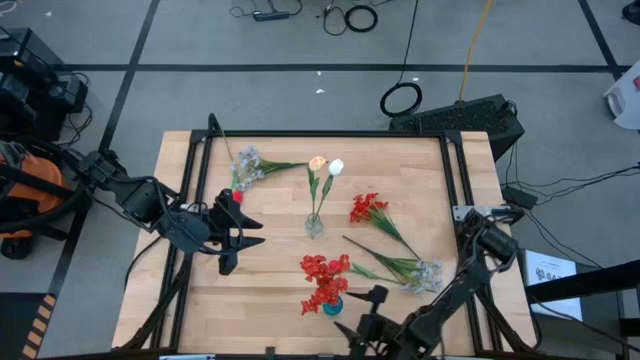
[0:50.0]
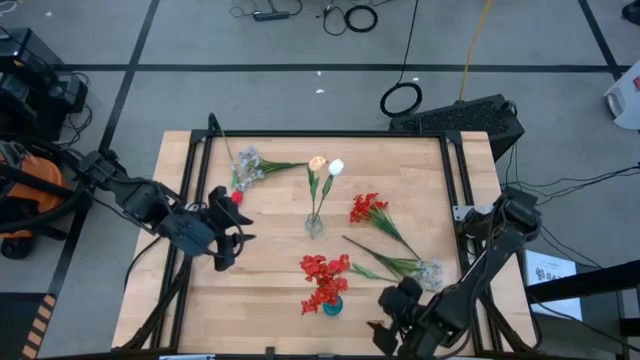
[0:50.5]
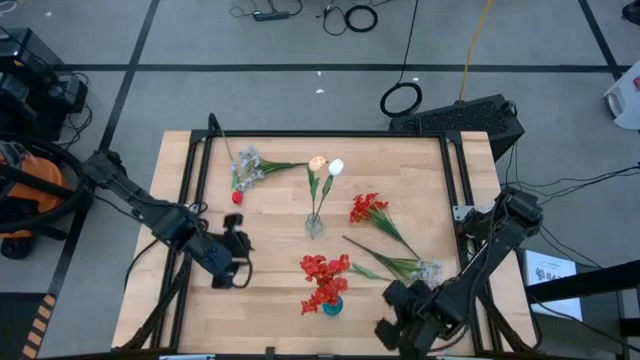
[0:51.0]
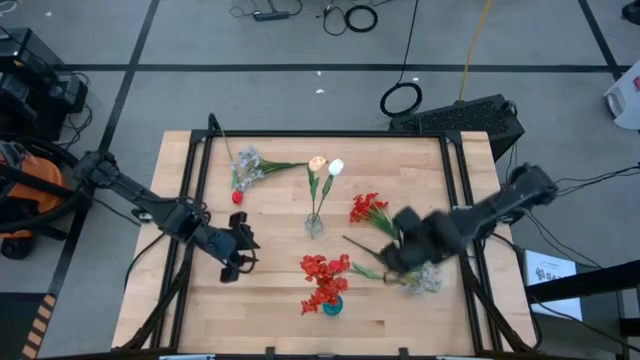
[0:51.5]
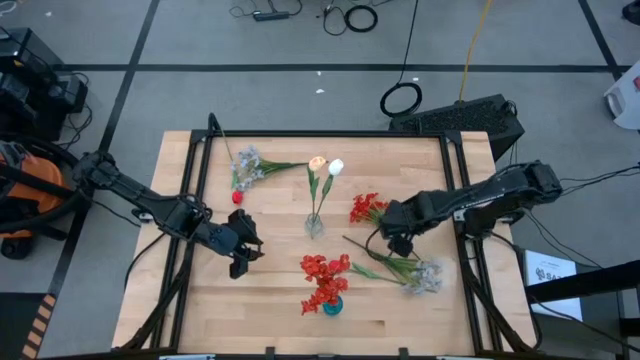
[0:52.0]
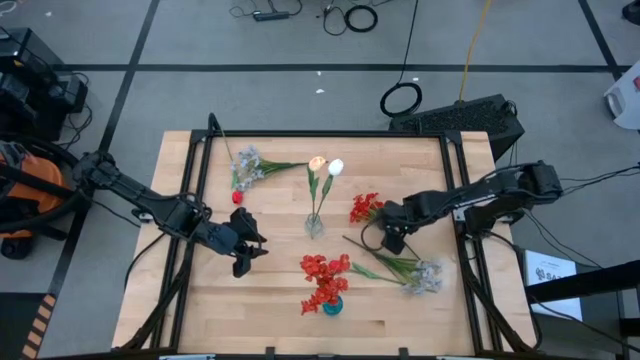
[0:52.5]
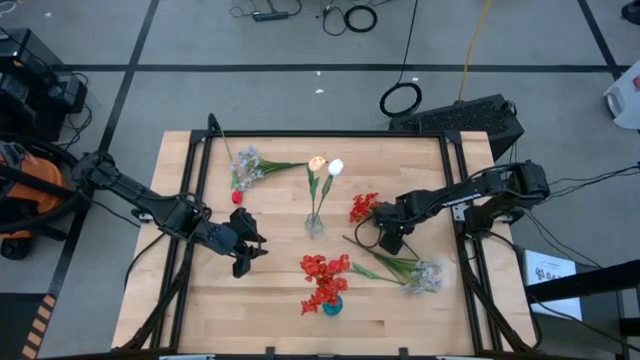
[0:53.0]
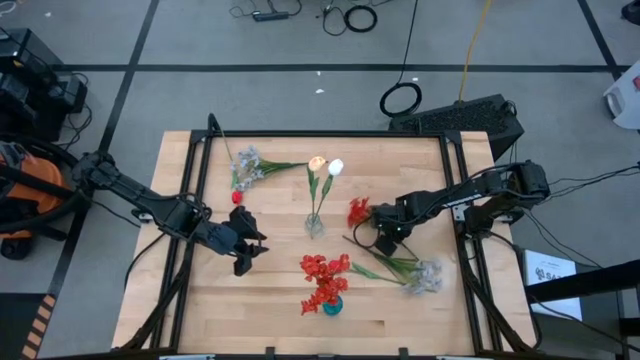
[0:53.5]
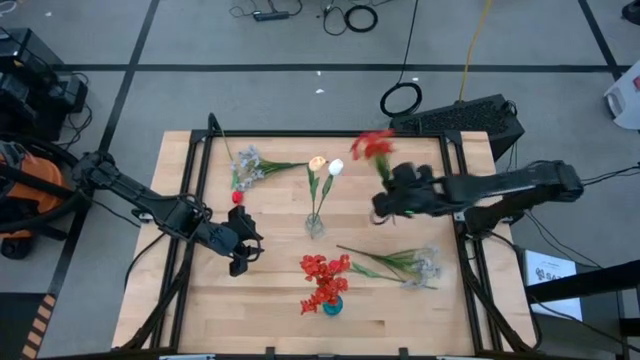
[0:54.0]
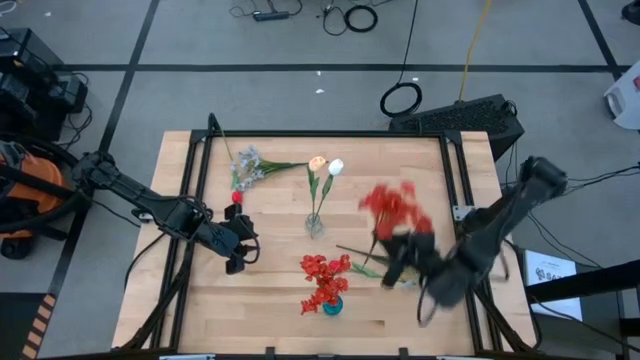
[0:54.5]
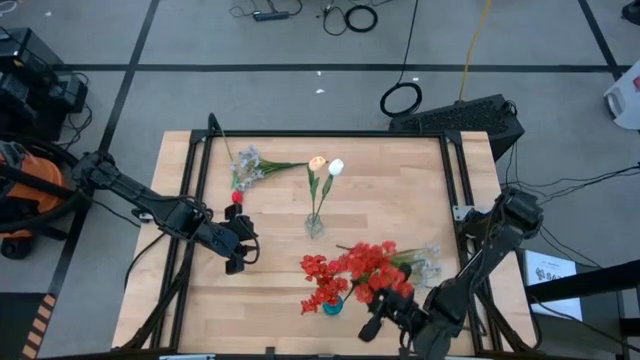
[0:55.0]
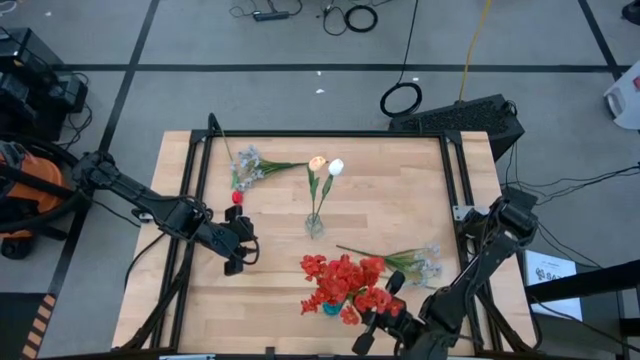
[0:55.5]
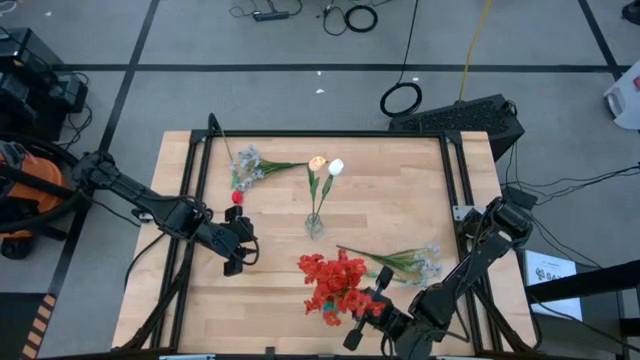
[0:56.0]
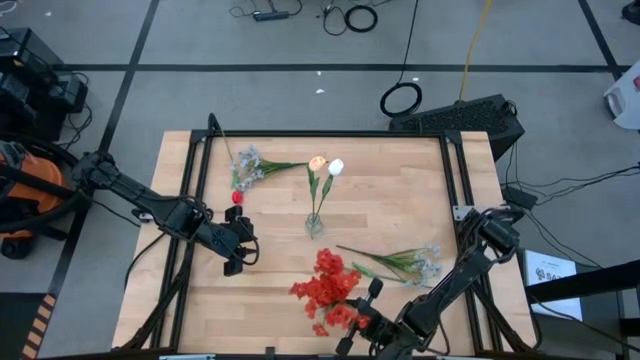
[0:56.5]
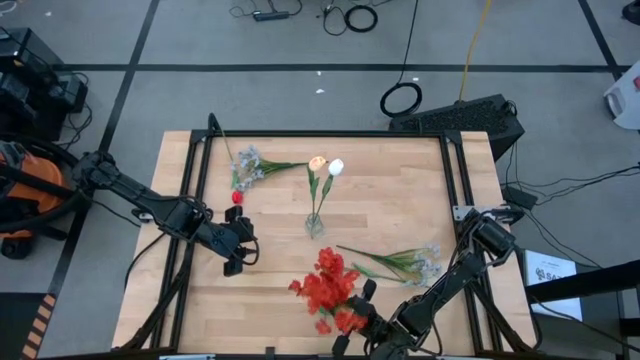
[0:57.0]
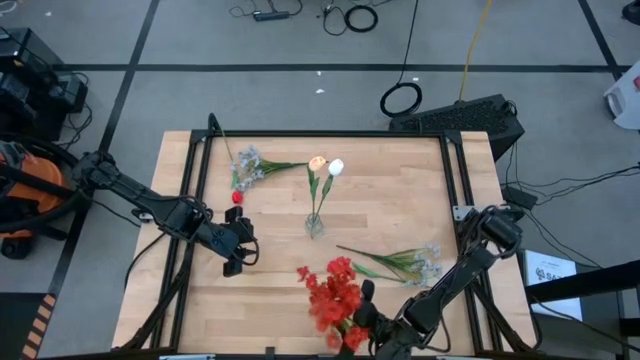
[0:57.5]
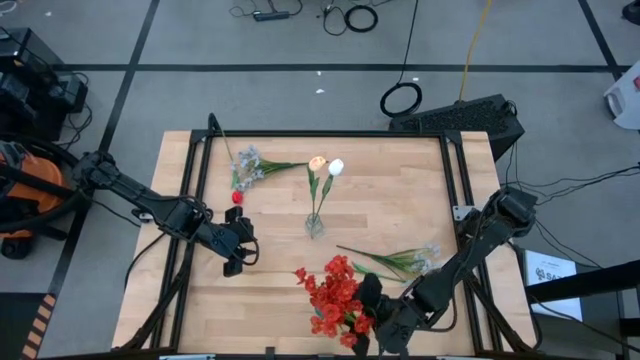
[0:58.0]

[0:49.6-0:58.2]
Task: Sort flowers into vase by color
Put the red flowers into the blue vase

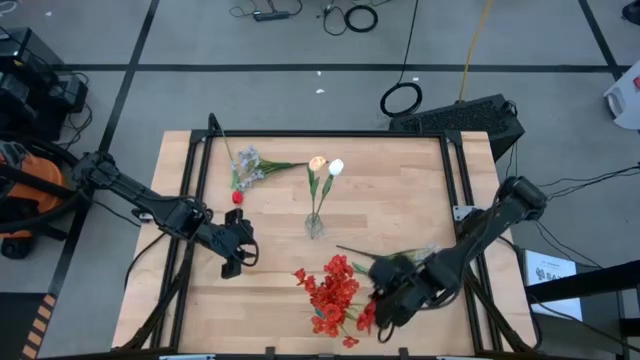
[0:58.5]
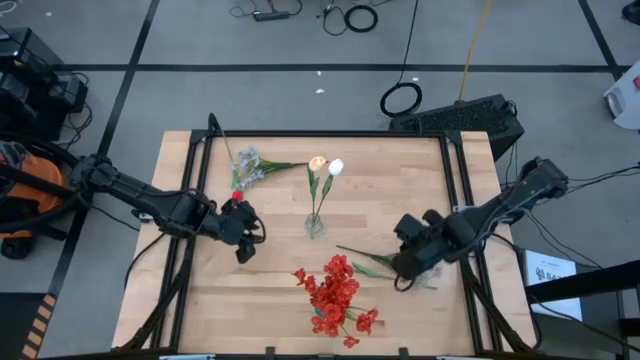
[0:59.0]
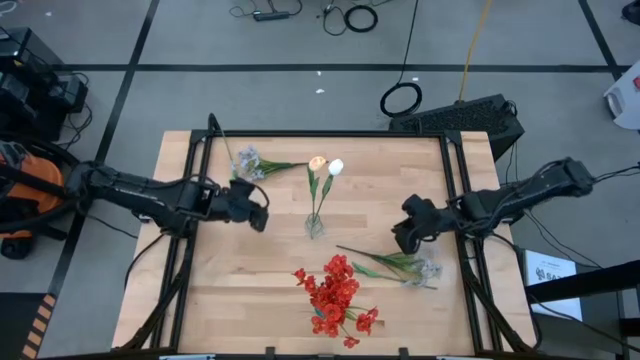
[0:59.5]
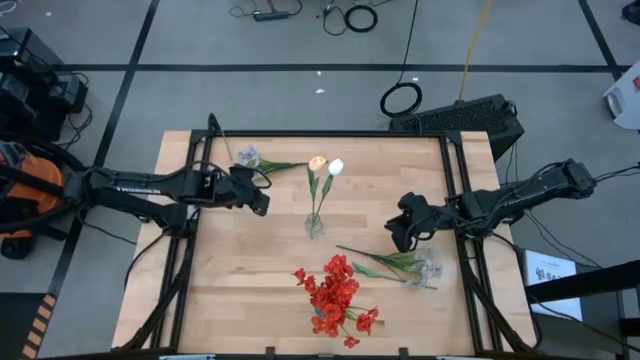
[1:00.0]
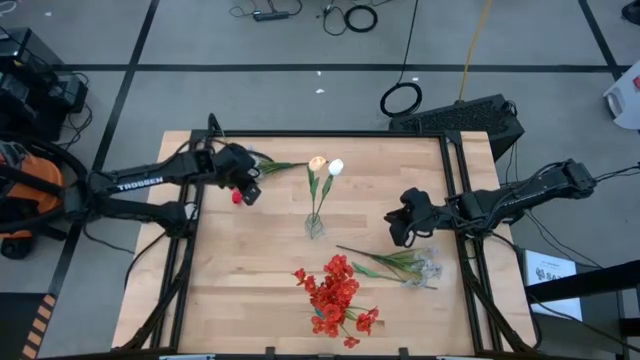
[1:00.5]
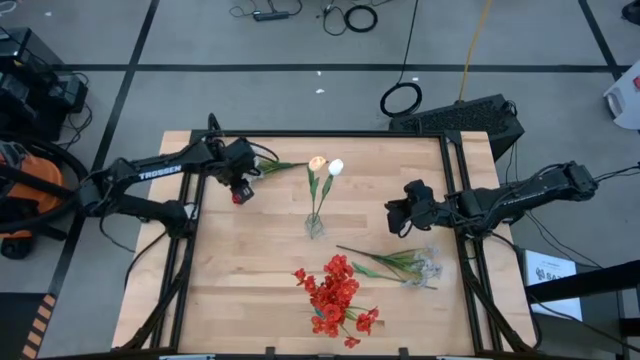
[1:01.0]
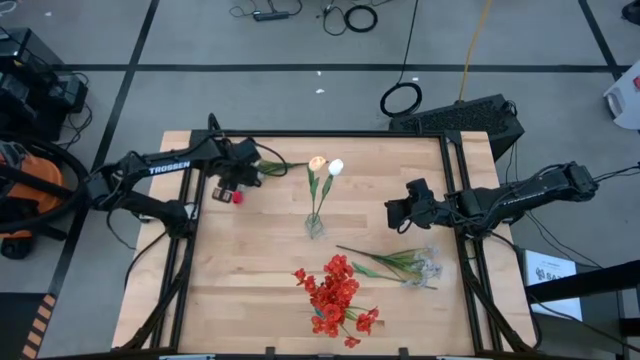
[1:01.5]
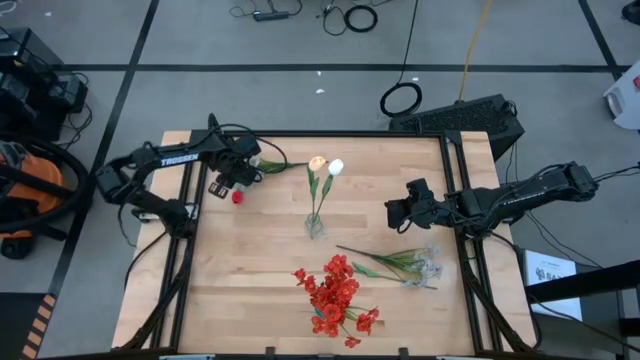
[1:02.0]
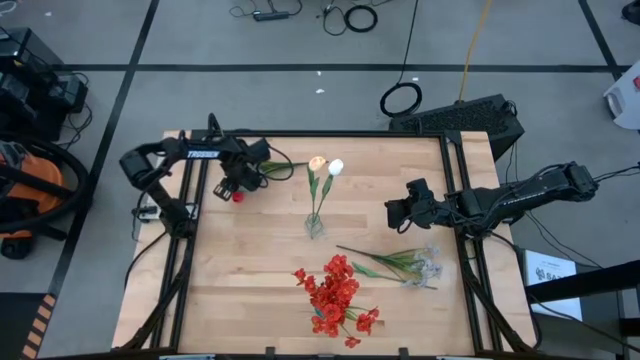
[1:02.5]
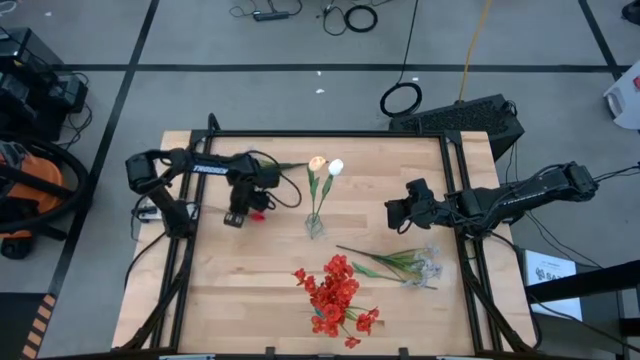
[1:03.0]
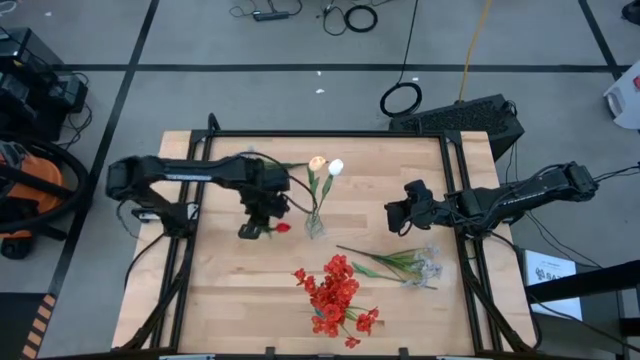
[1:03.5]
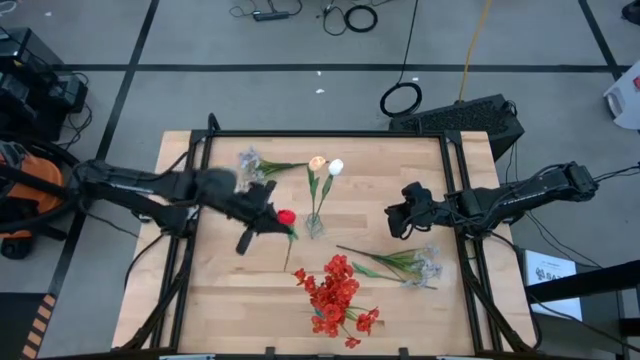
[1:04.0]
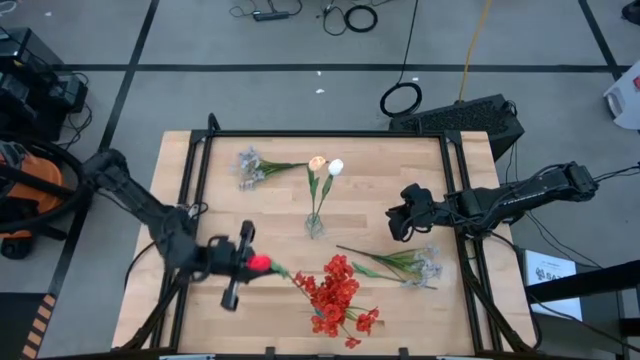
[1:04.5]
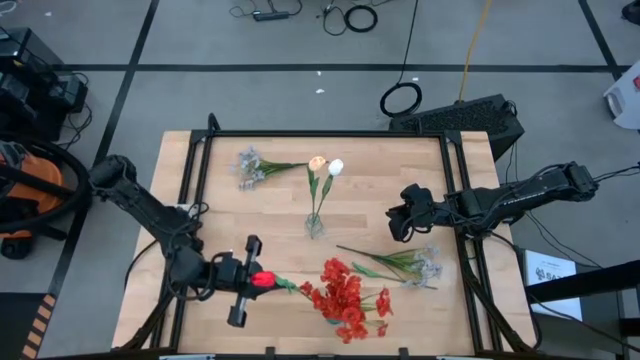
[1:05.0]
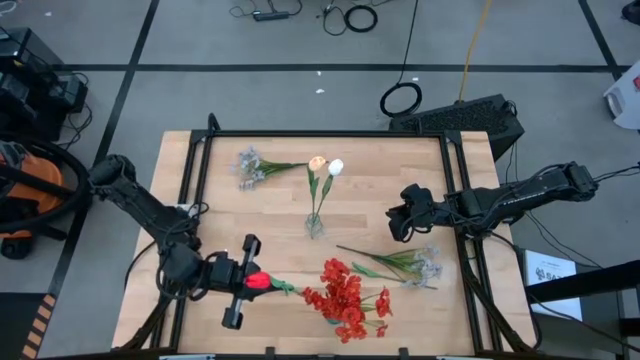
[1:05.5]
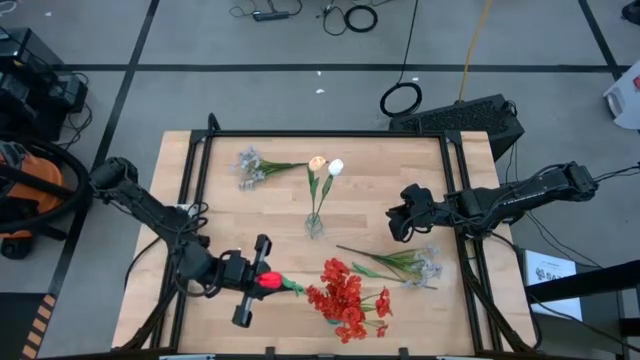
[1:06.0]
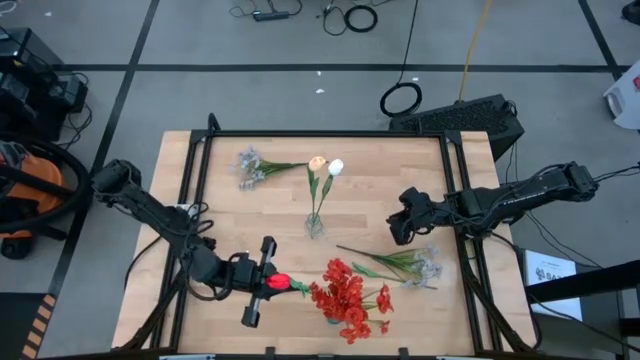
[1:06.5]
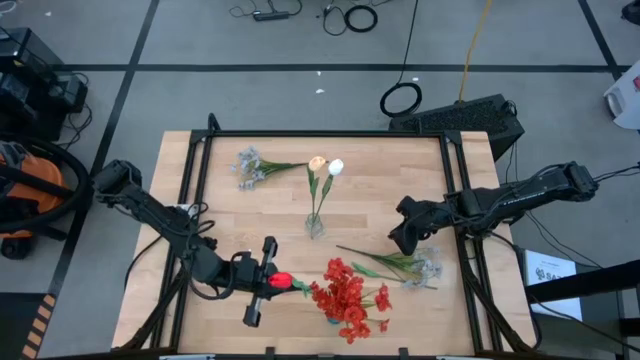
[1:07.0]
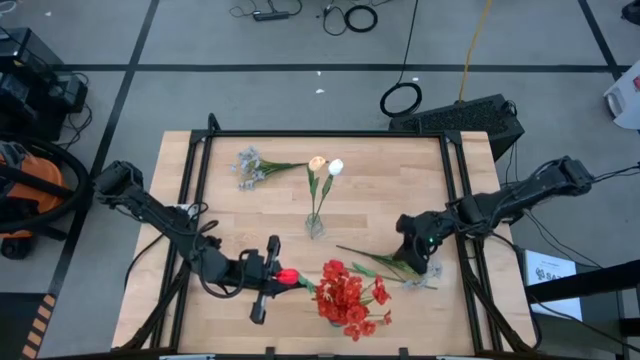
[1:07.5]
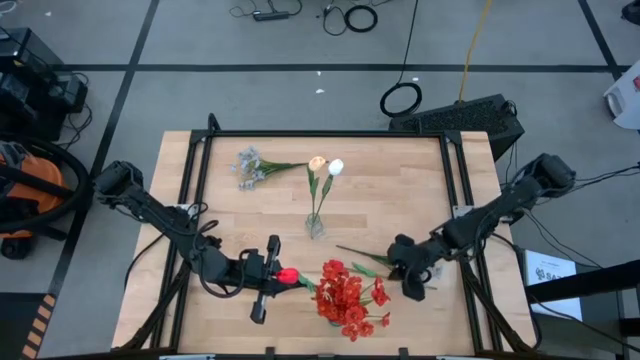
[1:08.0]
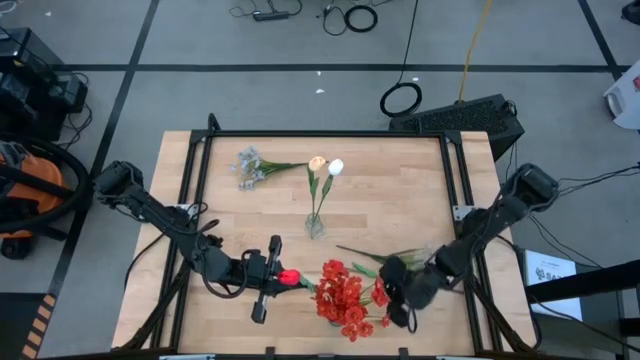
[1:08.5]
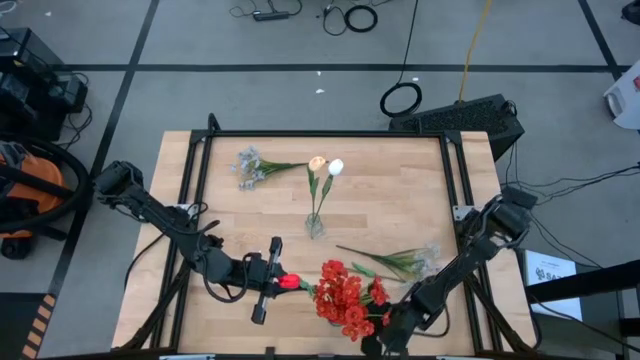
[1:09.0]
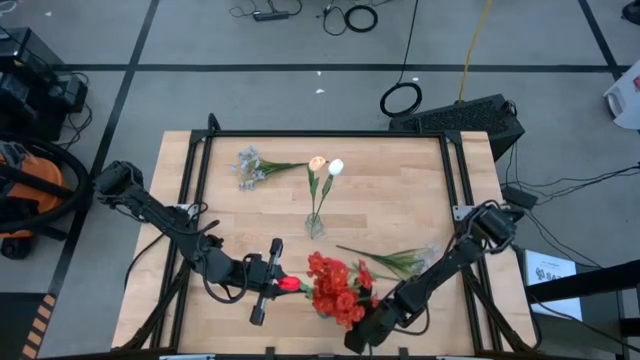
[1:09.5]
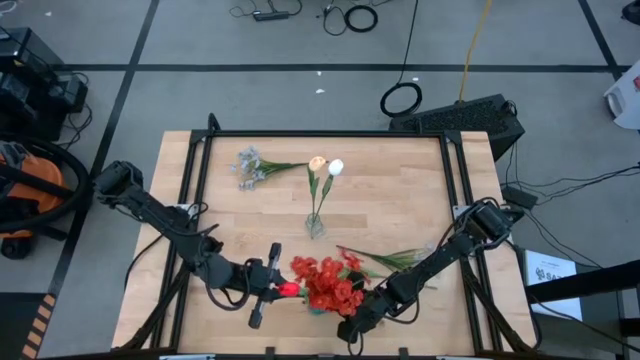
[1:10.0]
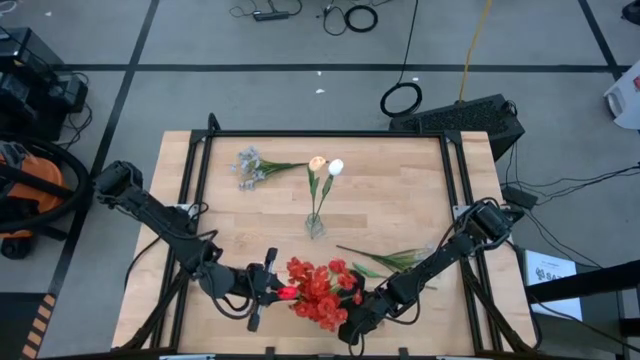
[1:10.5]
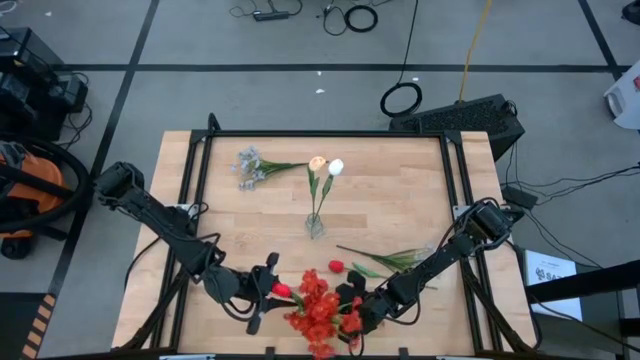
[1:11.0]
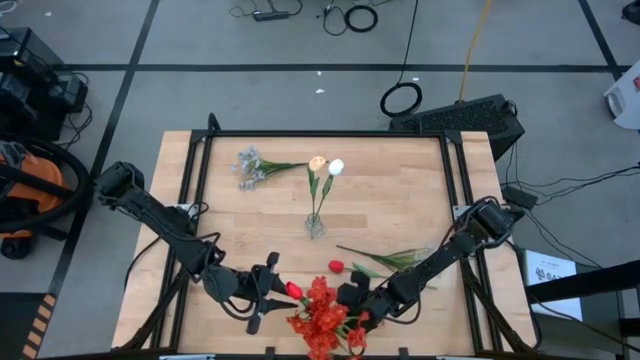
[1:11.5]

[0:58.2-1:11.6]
Put the top red tulip into the blue vase

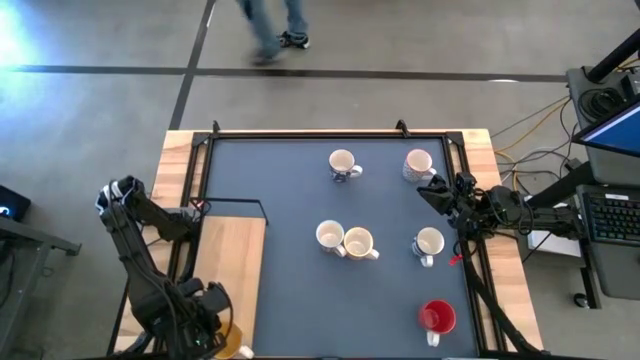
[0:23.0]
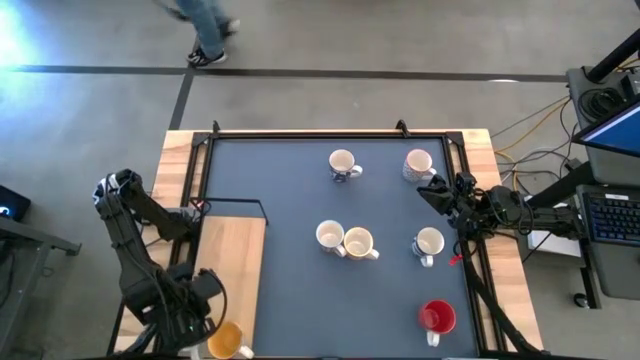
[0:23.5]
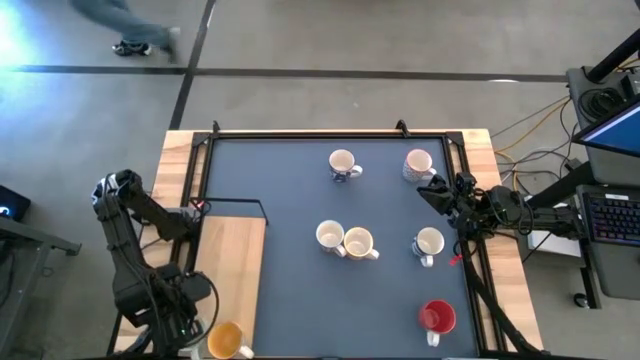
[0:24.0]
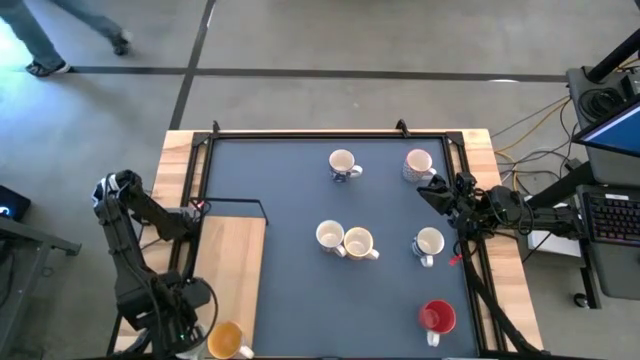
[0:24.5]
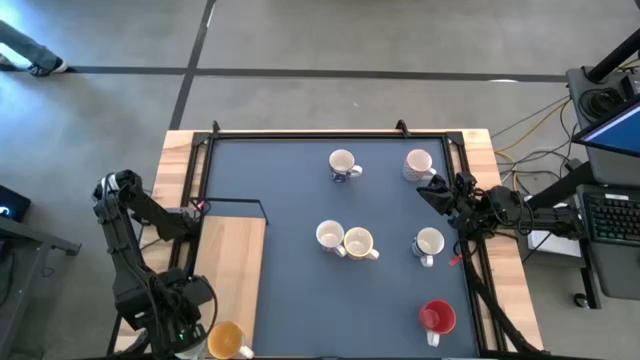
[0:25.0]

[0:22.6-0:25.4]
Task: Place coffee mugs
Adjust the patterned light green mug on the shelf
